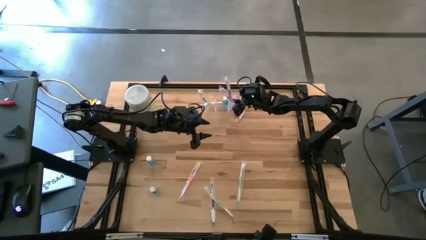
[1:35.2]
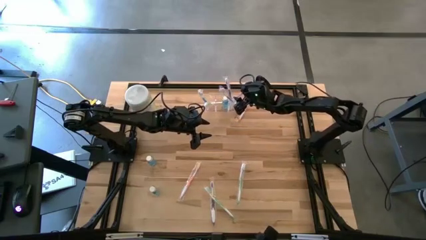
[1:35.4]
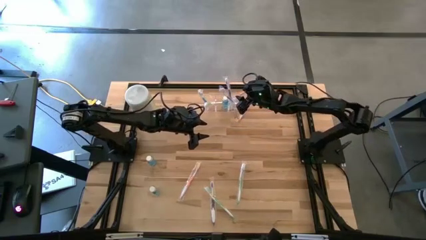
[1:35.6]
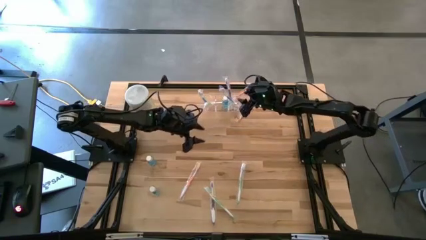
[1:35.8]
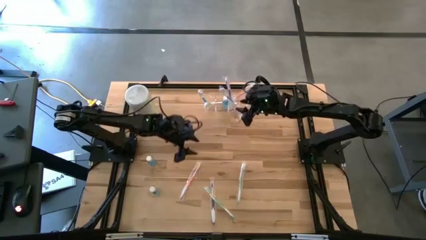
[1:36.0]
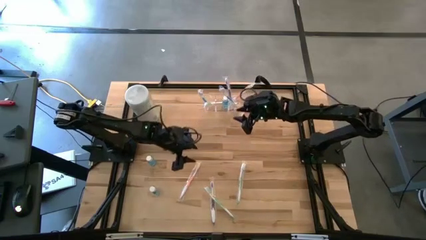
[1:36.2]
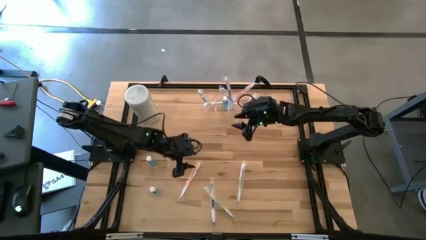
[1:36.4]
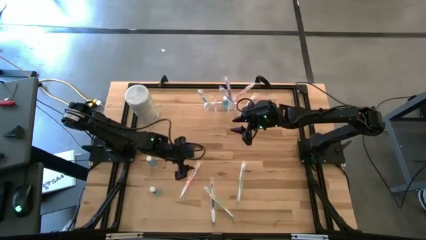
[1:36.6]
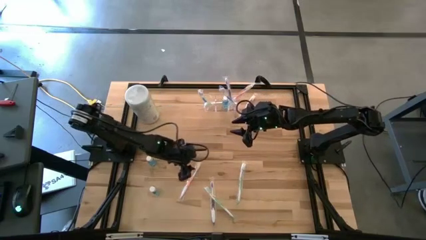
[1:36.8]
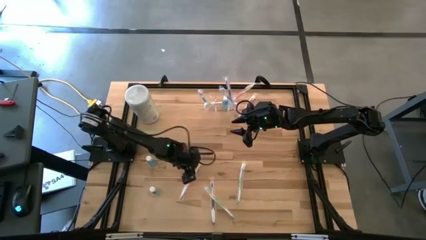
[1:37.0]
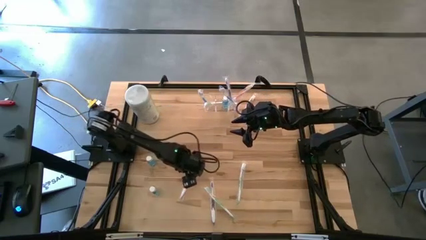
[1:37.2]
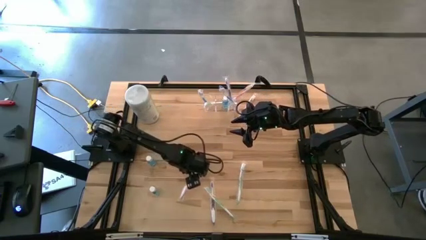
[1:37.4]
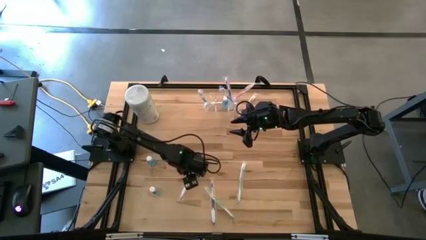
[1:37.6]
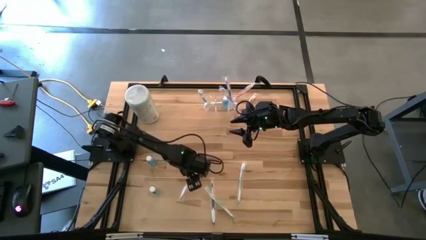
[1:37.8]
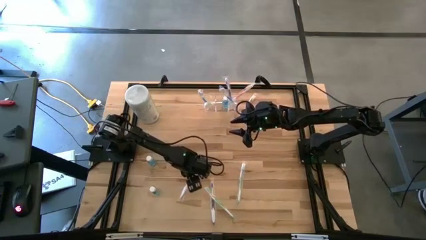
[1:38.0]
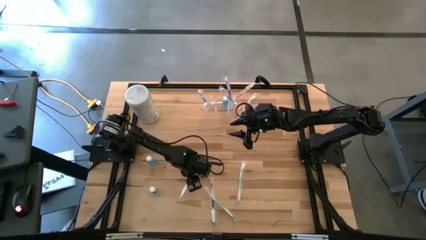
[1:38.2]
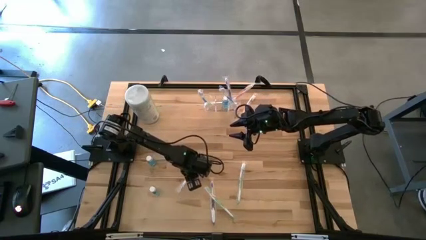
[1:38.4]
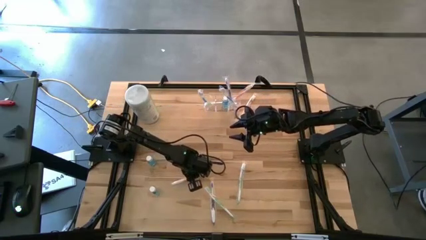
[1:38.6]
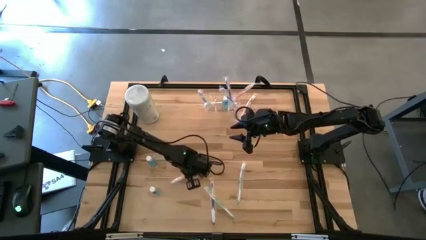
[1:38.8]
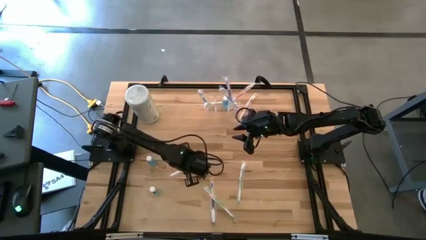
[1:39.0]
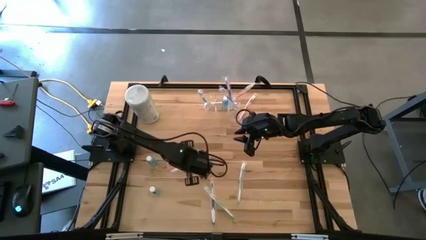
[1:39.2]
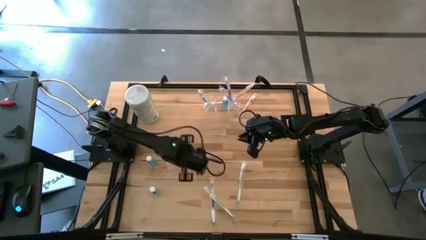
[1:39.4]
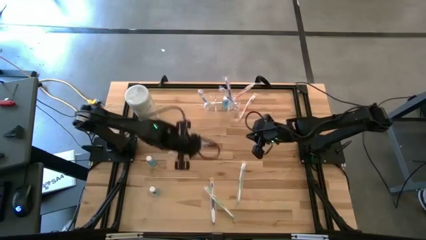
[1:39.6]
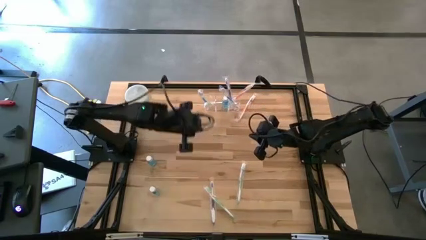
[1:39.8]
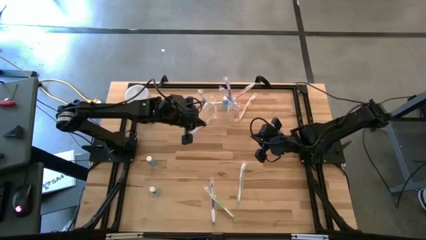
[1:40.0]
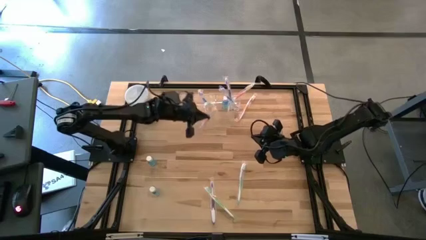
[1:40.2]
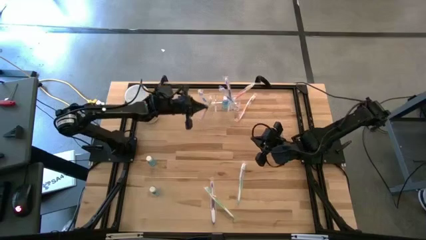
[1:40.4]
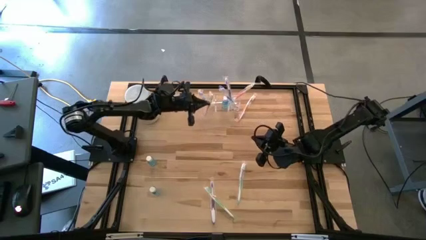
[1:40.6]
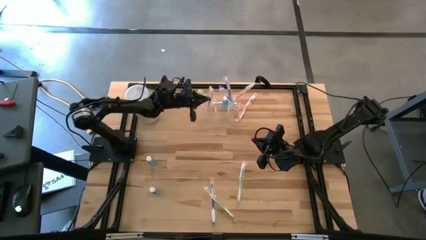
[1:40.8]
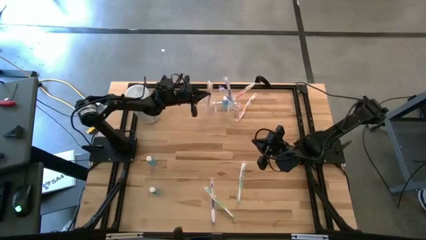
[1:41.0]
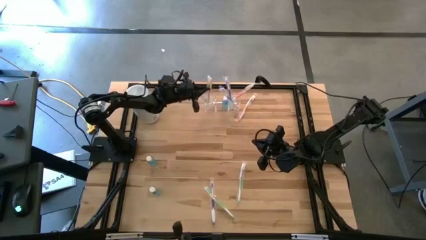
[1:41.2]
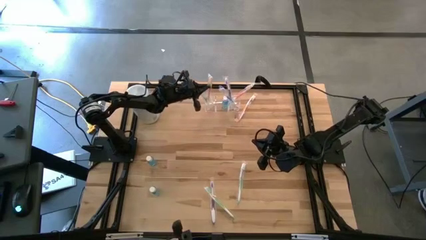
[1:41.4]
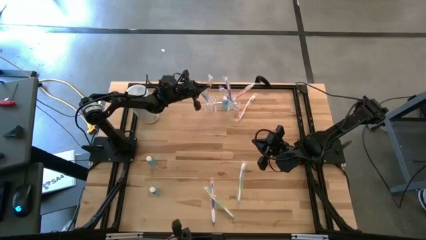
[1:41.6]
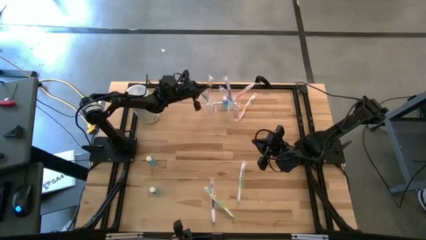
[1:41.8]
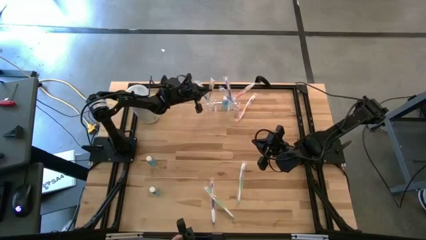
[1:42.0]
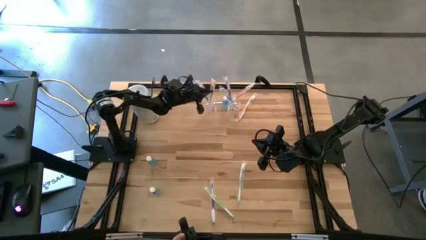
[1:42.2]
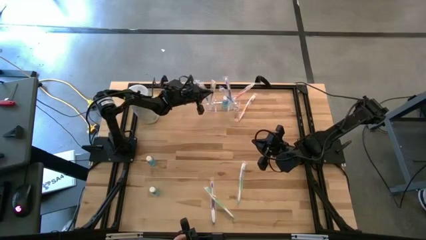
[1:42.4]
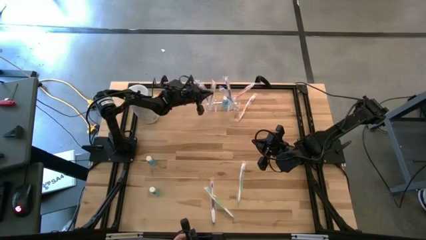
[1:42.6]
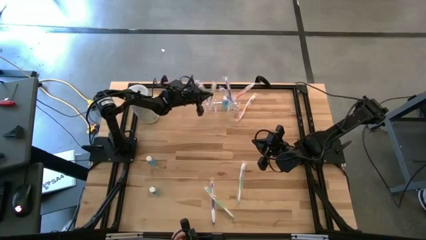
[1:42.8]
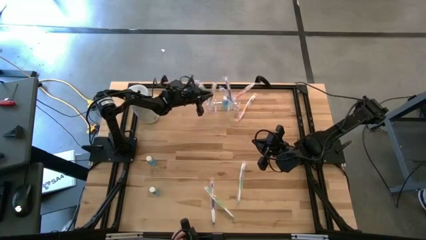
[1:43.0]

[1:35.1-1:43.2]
Task: Pick & Place toothbrushing station
Put the bottom orange toothbrush into the transparent organizer

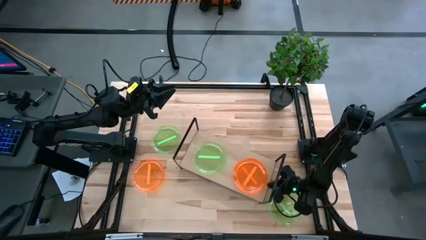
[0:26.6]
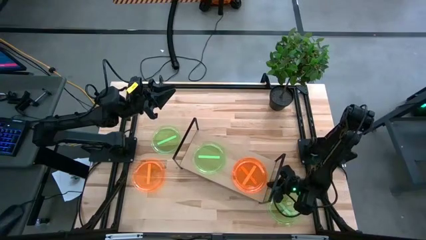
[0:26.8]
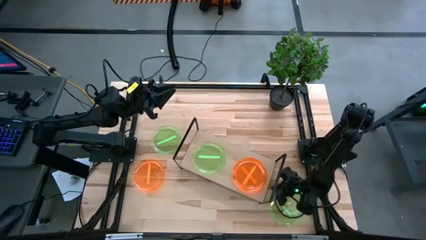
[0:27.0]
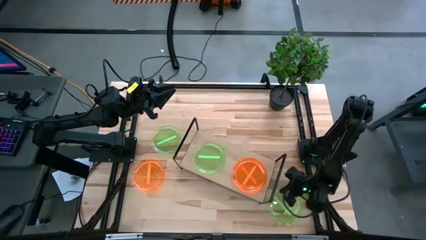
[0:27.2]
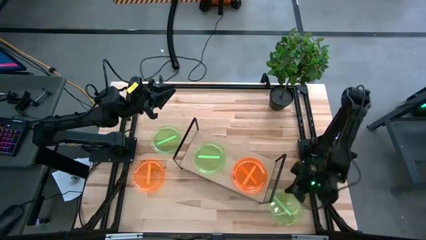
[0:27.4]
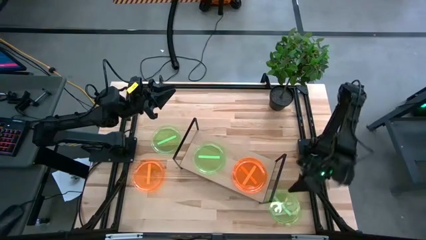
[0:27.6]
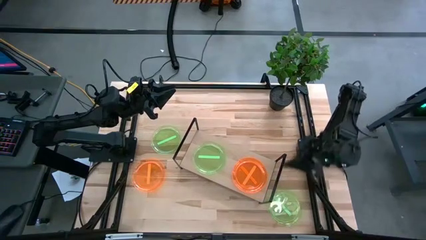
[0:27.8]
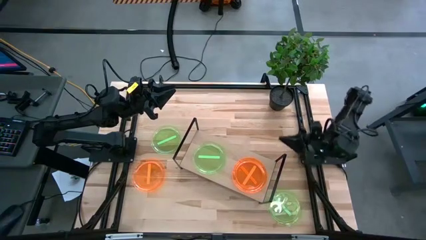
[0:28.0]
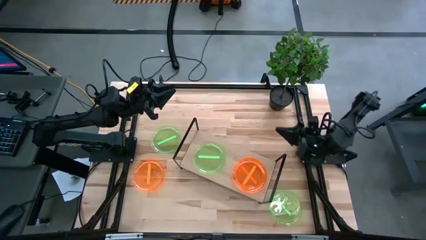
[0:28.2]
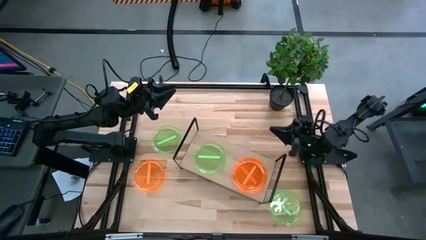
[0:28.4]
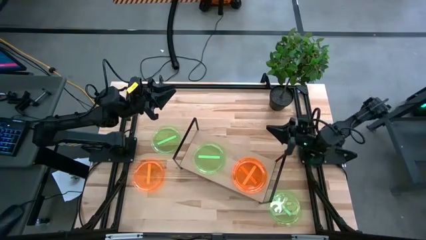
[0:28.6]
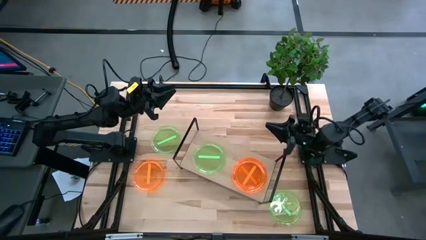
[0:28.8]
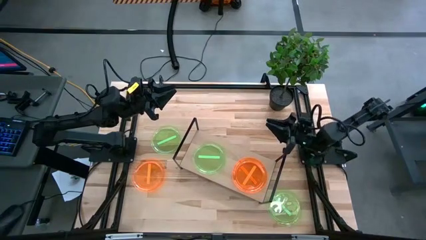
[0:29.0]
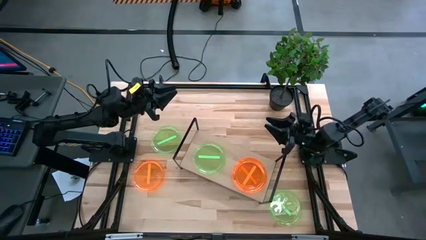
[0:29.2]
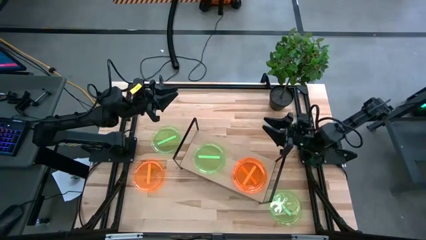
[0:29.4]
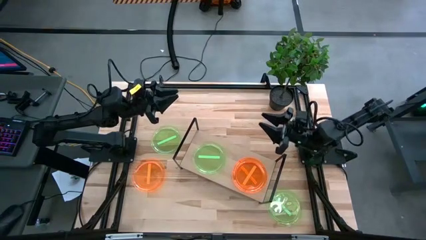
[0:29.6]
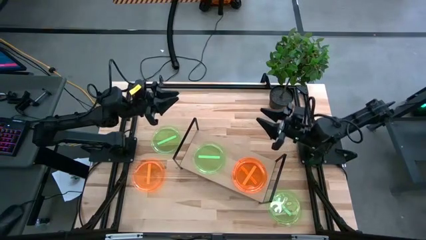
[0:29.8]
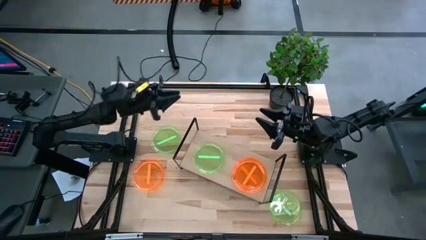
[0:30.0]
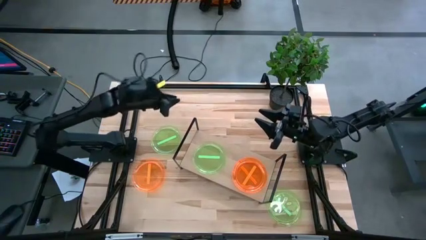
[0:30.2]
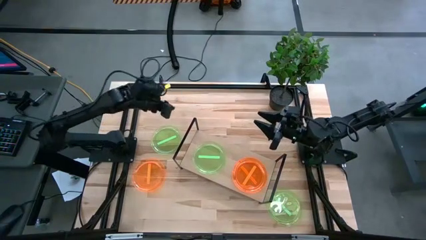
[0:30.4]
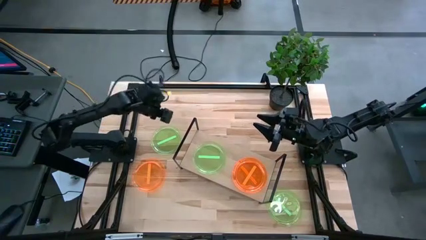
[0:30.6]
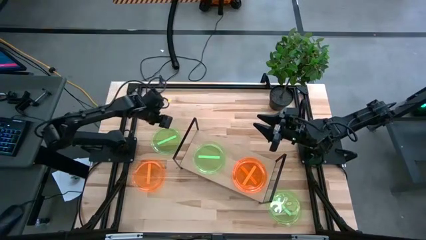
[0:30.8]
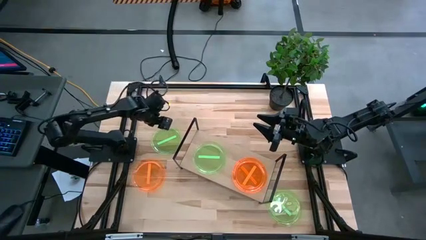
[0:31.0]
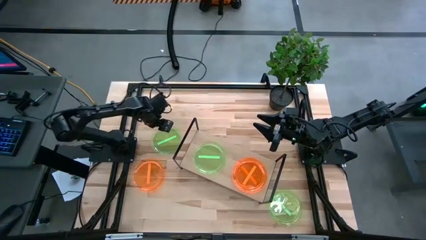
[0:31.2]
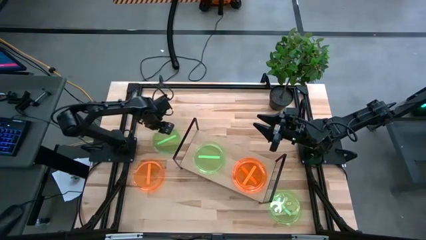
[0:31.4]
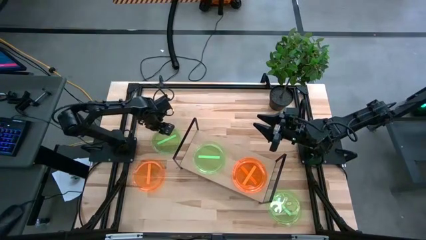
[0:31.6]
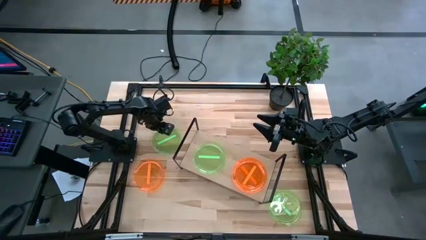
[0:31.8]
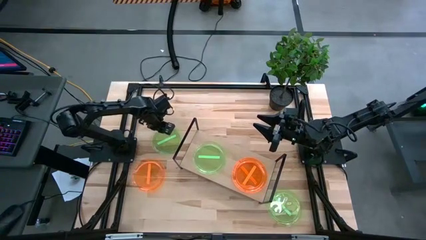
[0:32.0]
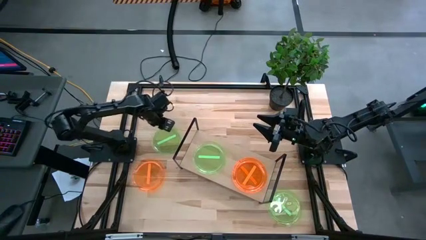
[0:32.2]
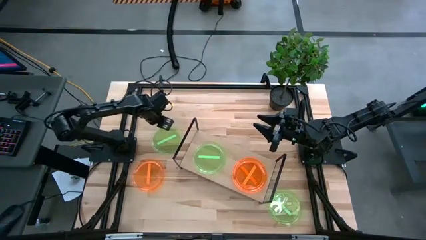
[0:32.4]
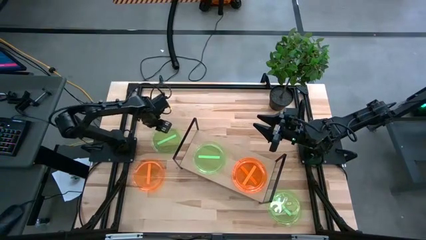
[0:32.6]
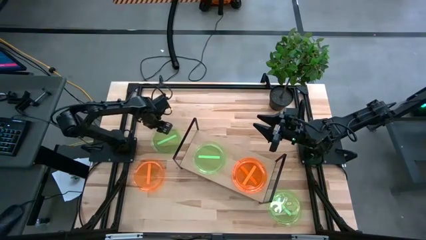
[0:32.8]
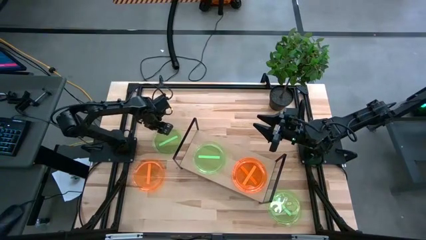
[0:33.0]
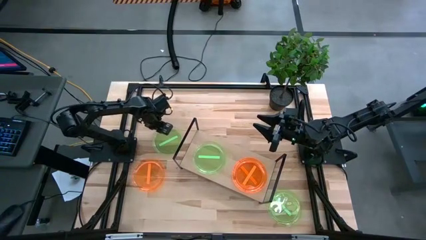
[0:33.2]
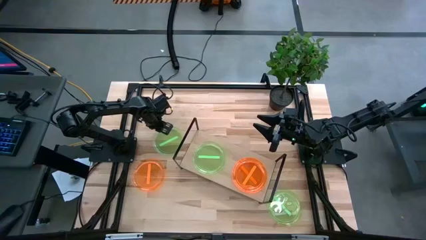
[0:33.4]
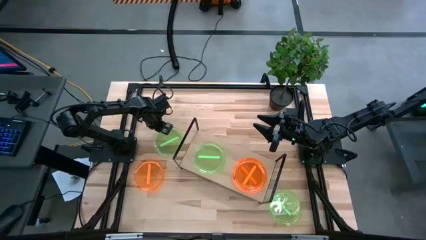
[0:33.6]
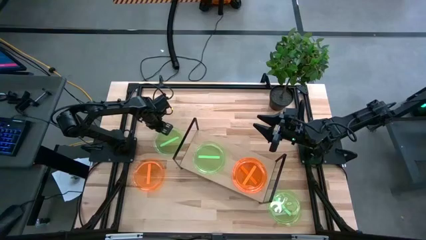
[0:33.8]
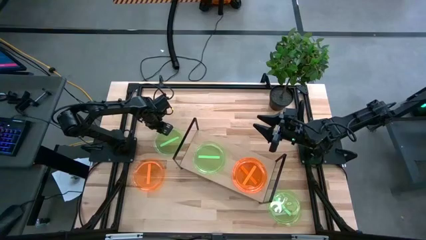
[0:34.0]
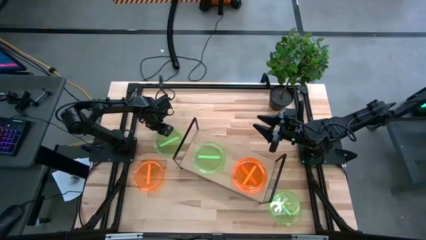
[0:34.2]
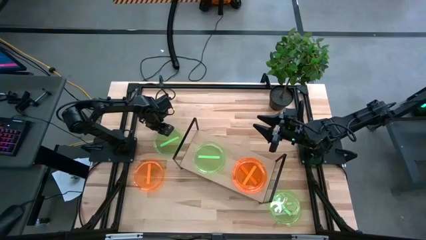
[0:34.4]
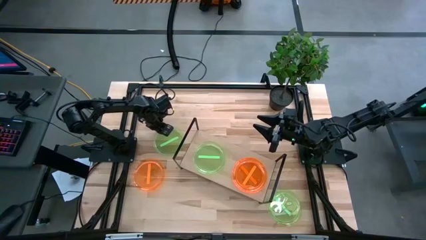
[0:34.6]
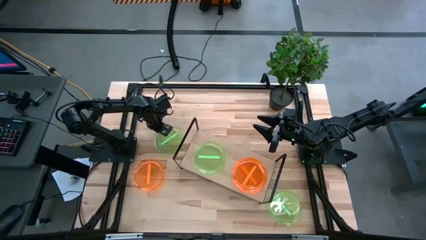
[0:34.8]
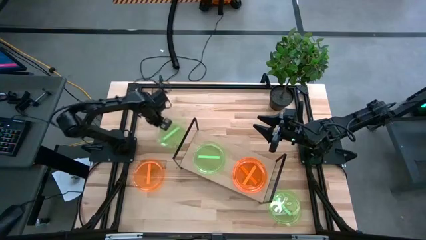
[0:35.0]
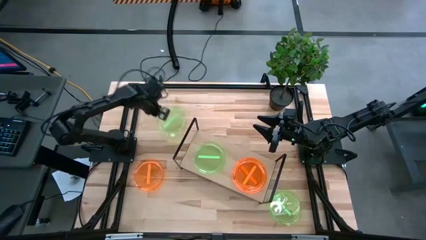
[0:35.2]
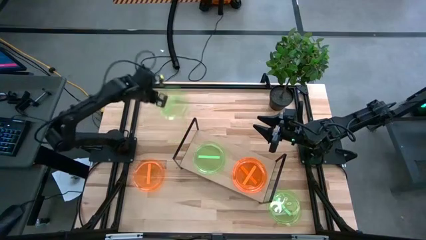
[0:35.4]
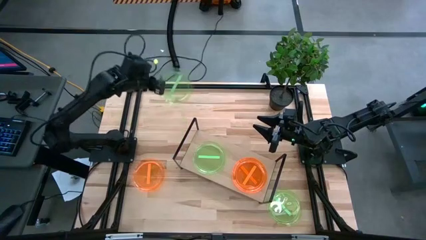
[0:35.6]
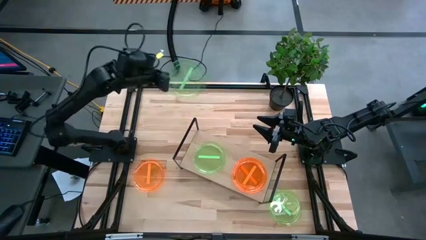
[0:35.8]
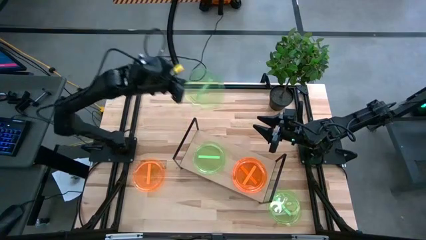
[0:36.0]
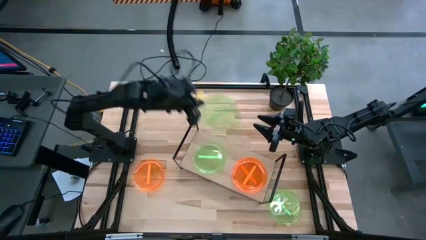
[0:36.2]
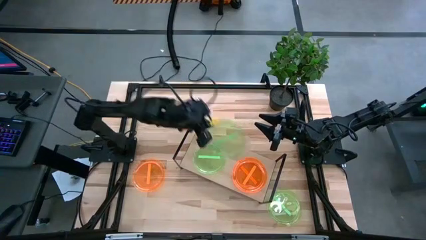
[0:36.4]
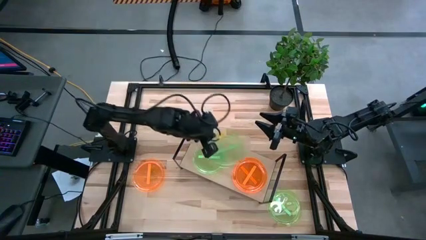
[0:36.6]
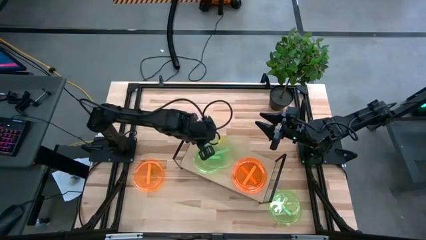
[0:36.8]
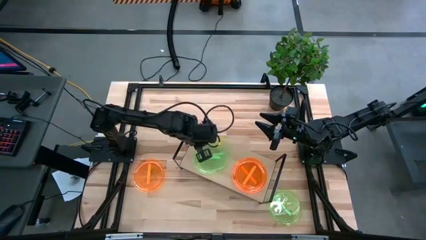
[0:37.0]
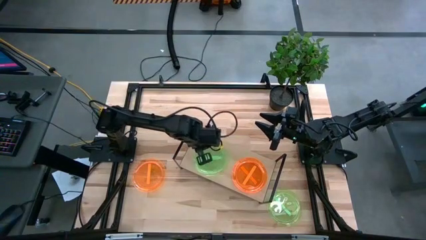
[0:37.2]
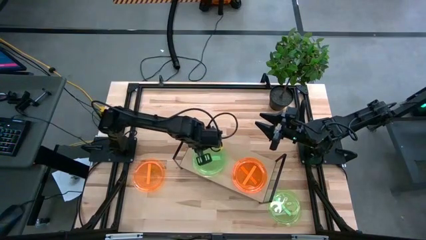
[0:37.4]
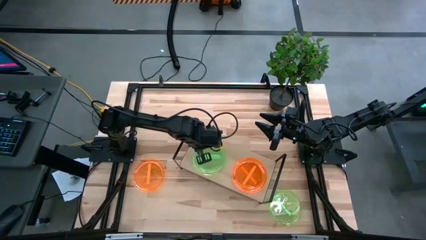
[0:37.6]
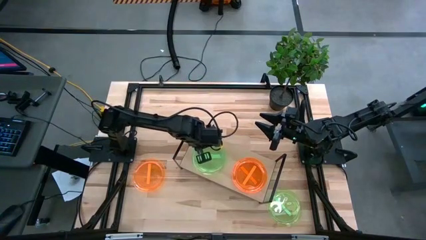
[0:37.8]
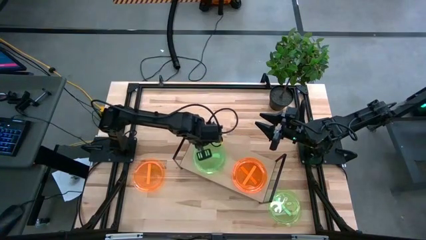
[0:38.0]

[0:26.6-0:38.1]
Task: Place and stack plates onto a shelf
Stack the top green plate on the top of the green plate on the shelf
